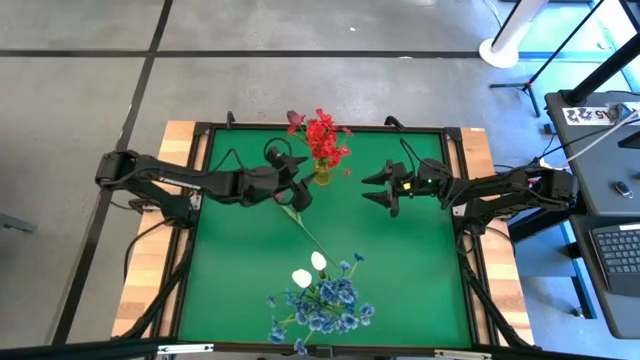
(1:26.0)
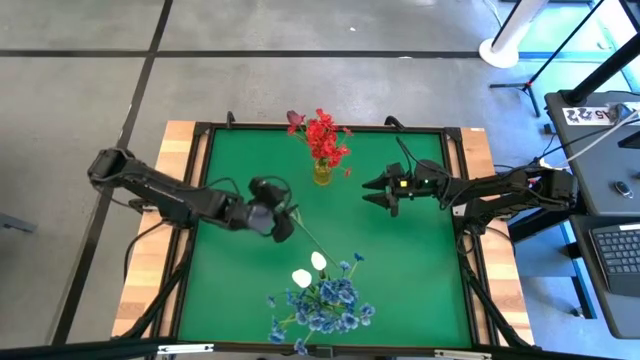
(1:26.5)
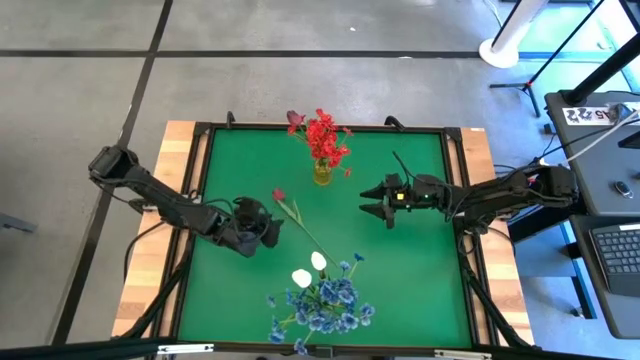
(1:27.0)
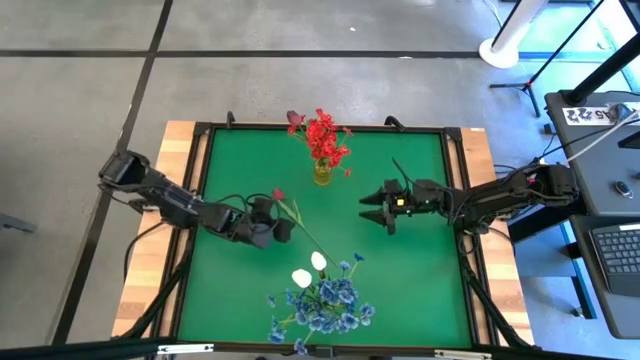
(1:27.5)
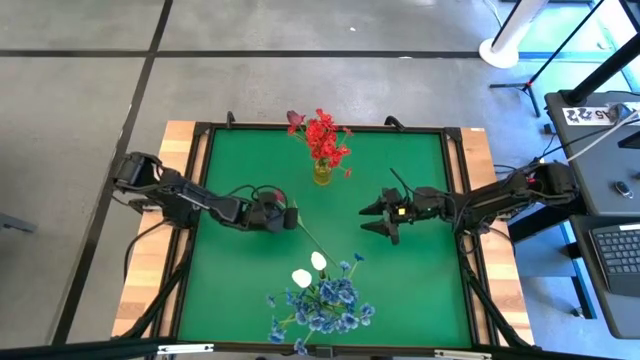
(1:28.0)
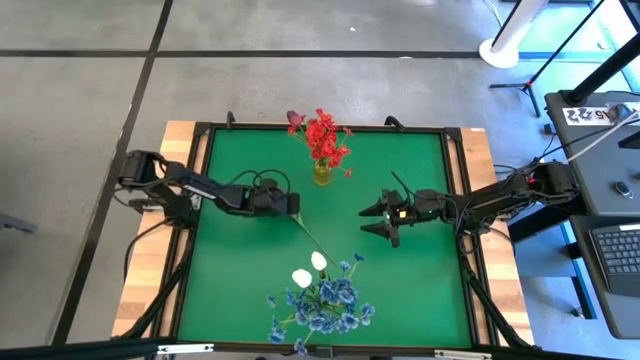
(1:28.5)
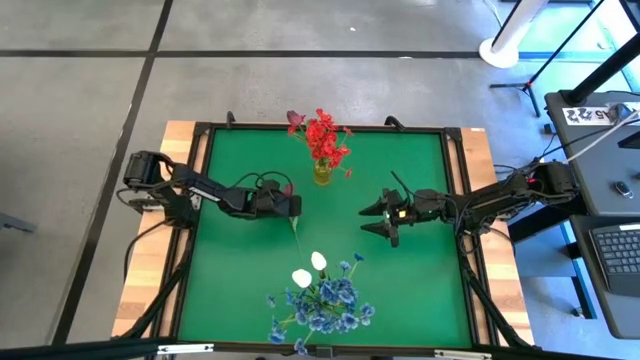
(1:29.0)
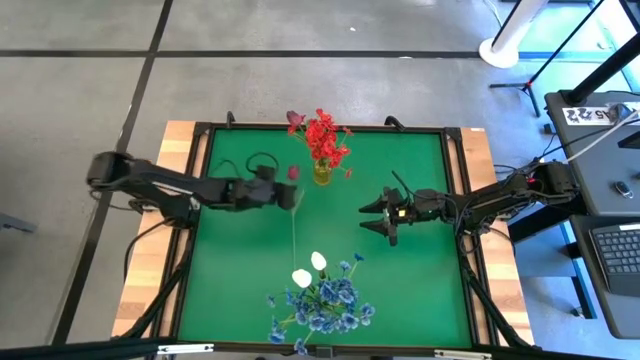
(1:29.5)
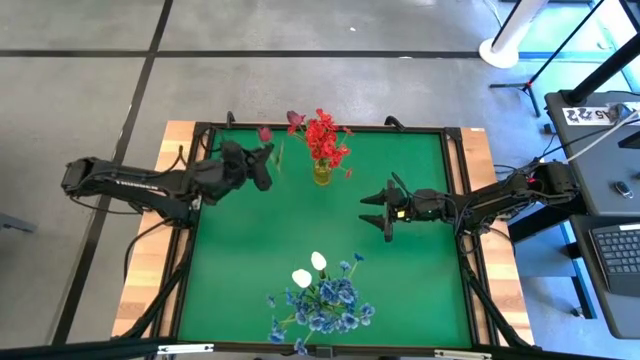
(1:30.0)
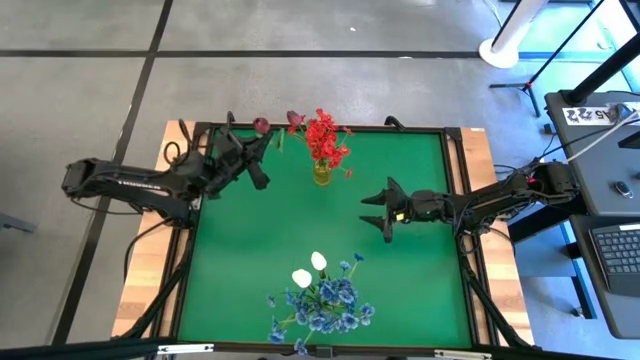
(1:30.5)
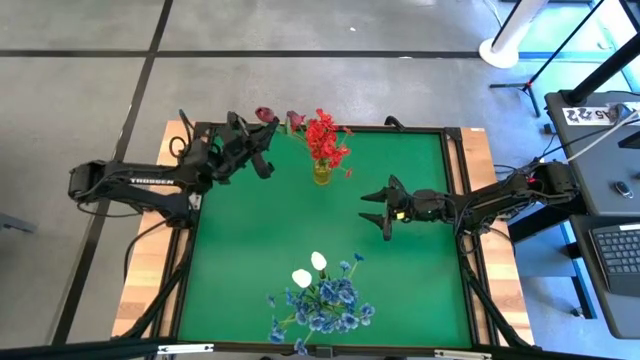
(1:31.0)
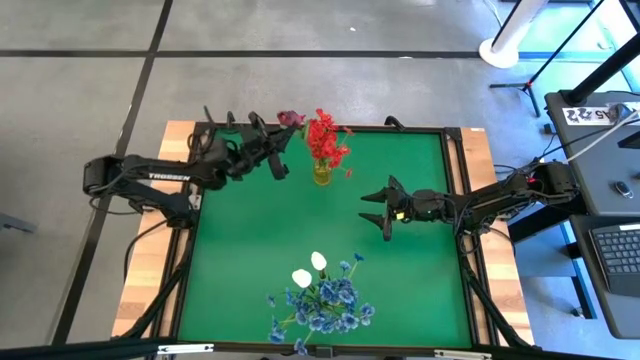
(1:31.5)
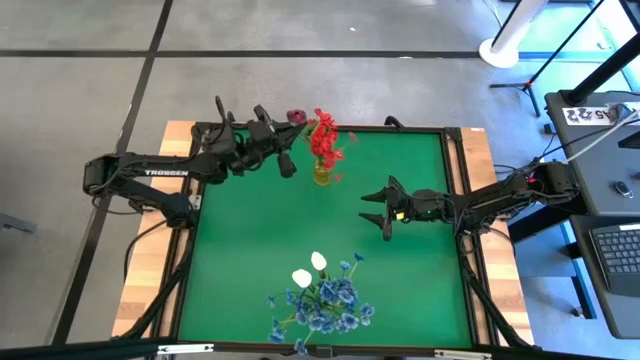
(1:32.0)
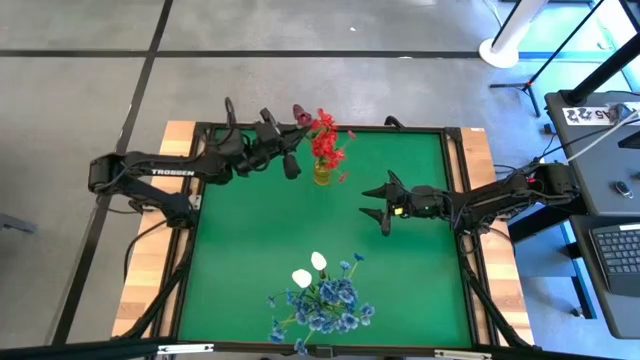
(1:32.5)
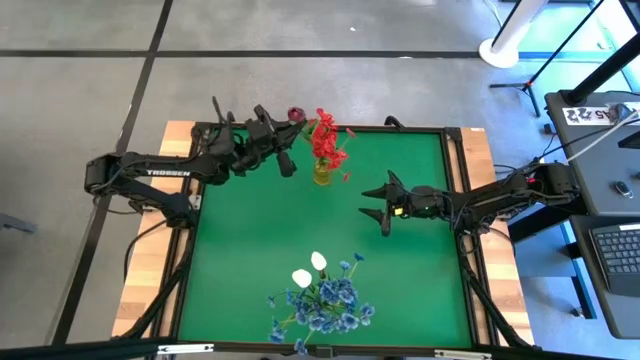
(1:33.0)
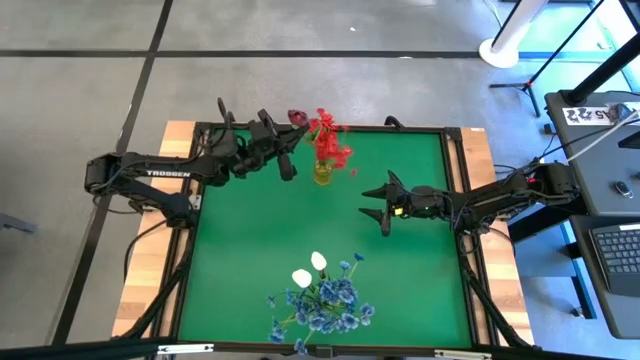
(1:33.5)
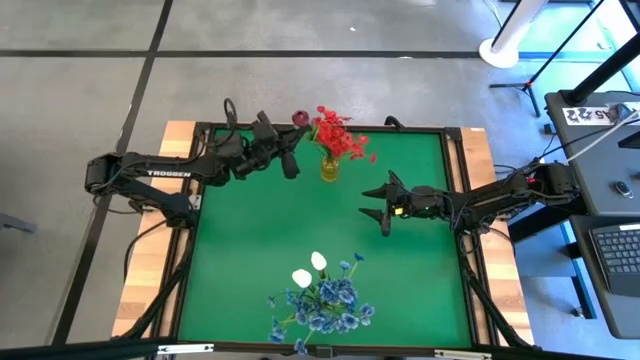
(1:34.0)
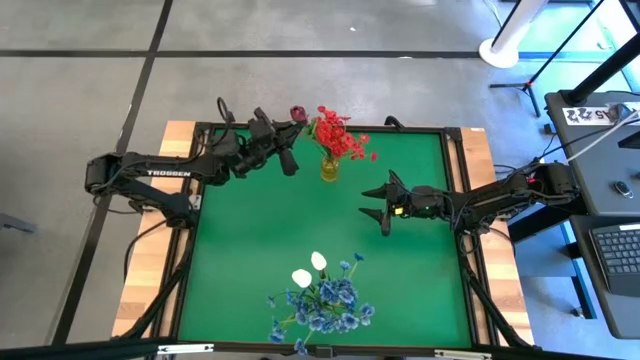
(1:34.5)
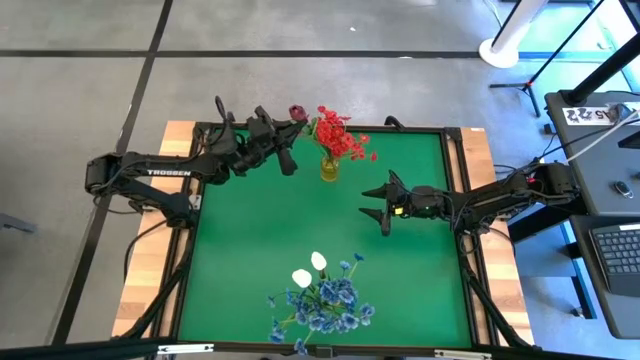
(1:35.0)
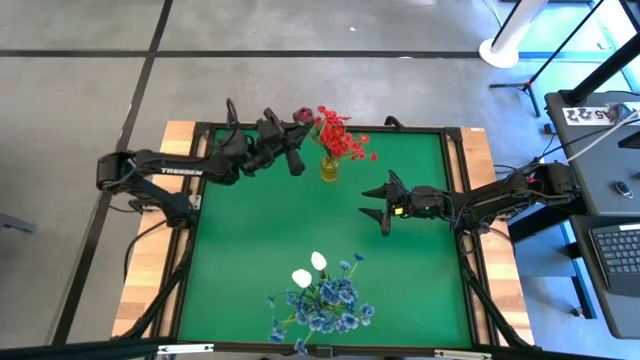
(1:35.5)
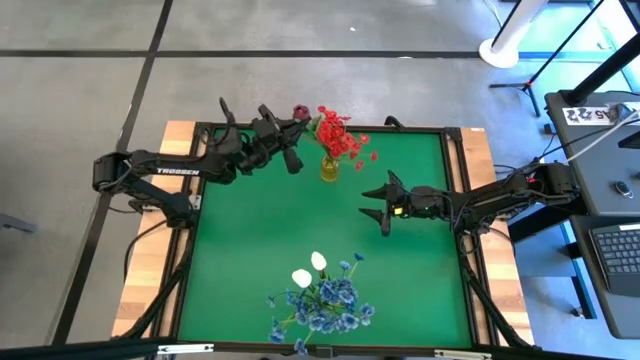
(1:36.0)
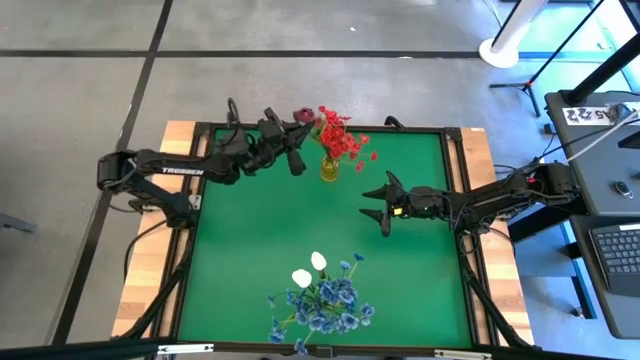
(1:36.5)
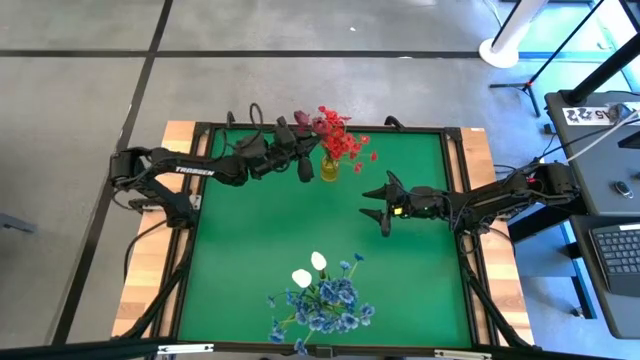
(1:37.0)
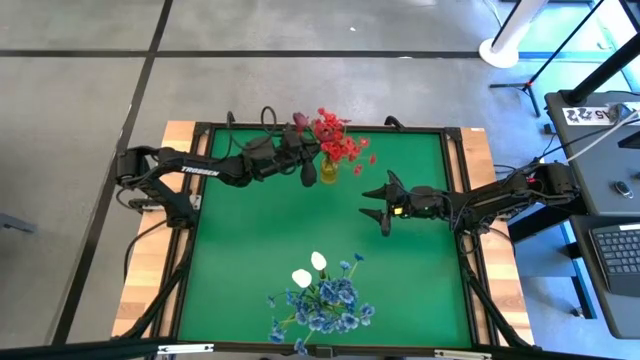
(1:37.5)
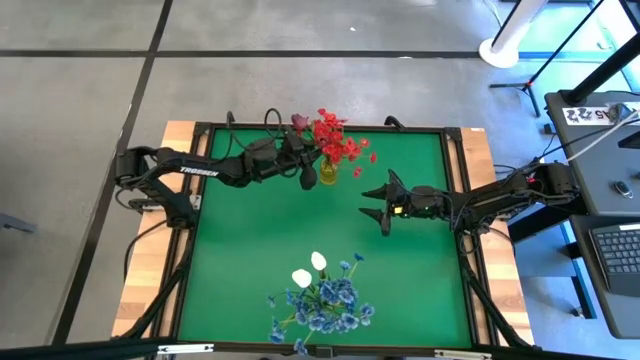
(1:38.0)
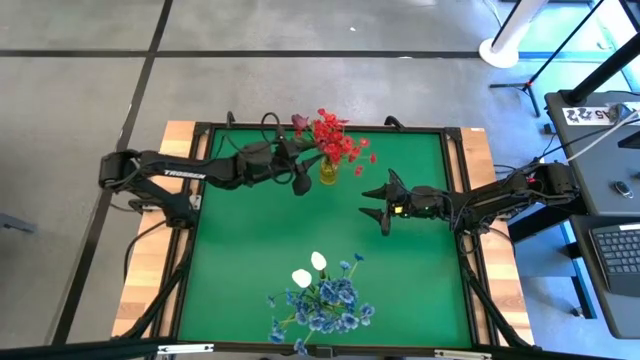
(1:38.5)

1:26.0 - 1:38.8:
Task: Sort flowers into vase by color
Put the dark red tulip into the yellow vase

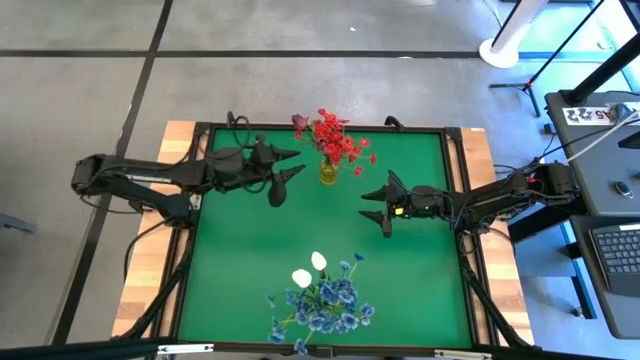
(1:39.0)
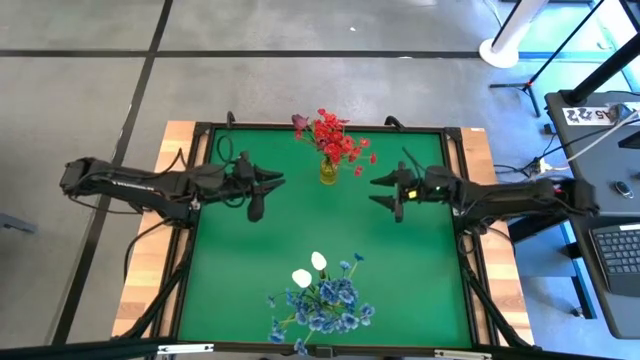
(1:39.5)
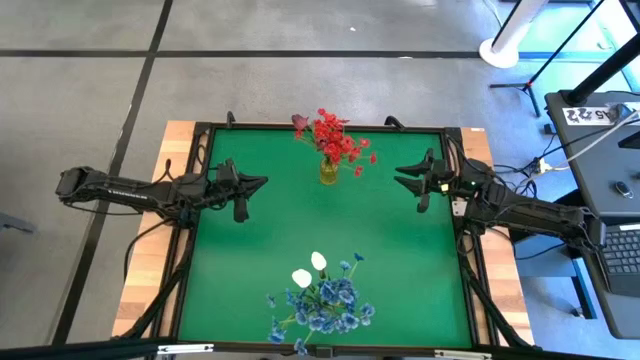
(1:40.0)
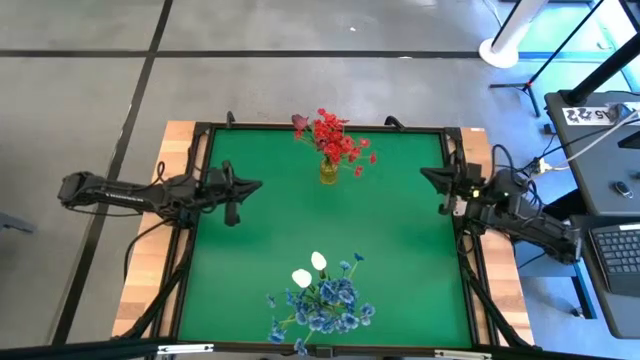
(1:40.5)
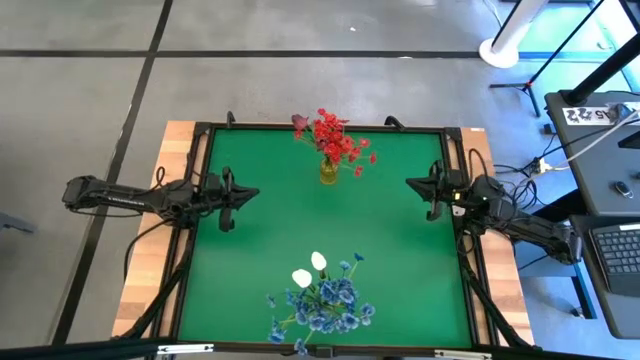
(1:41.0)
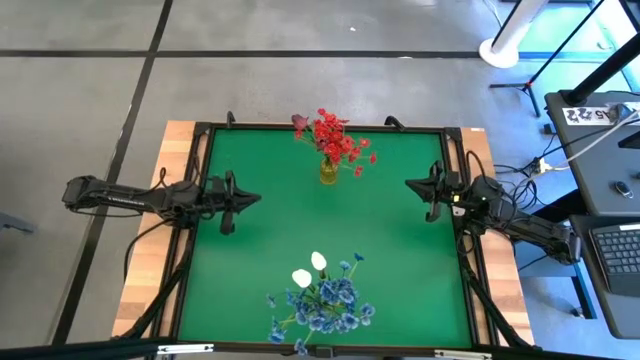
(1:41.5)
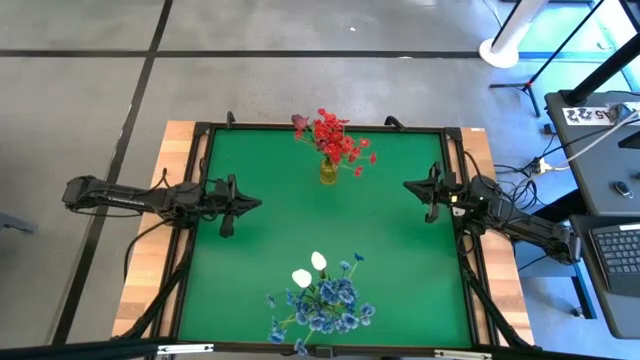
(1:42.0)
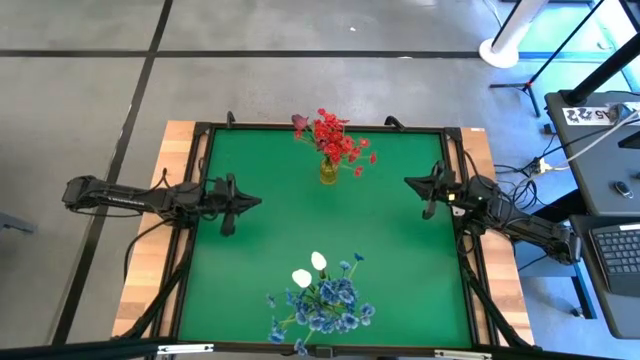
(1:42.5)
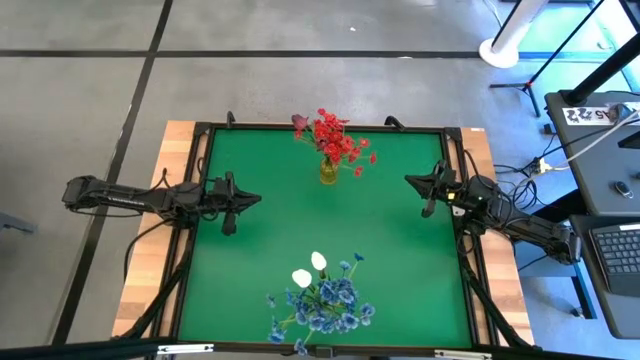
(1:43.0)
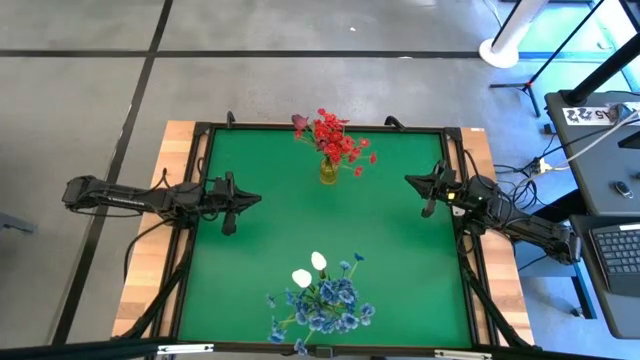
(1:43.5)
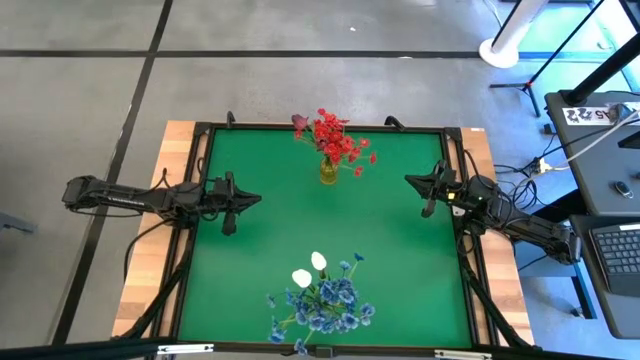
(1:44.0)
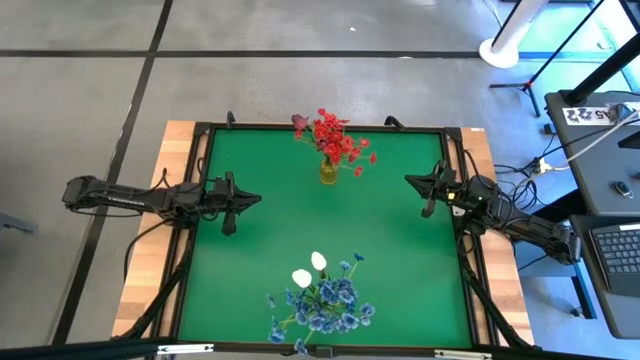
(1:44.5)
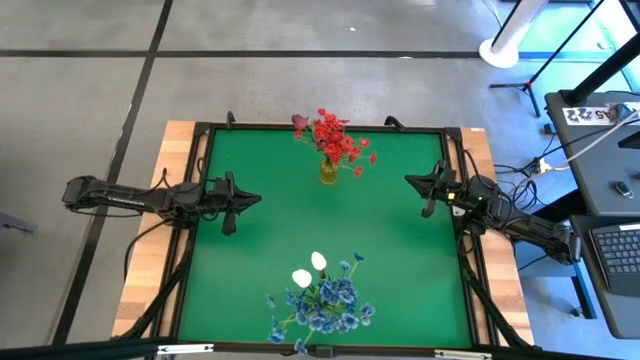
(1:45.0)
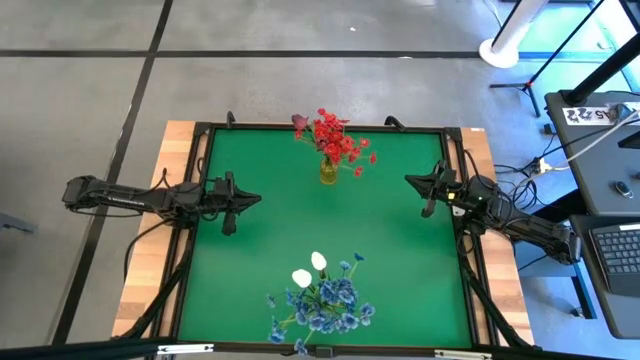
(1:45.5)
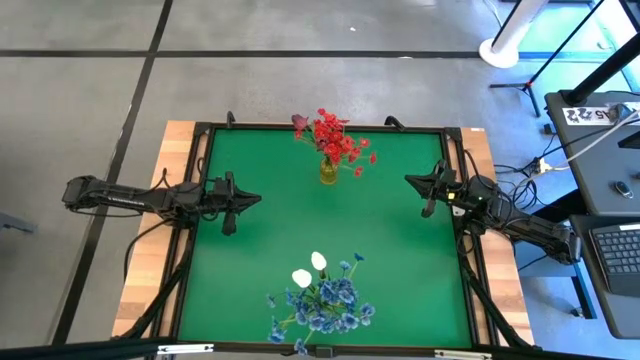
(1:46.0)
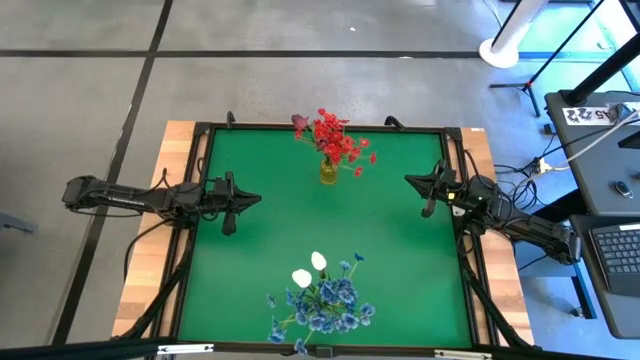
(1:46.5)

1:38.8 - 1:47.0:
Return to Home Position

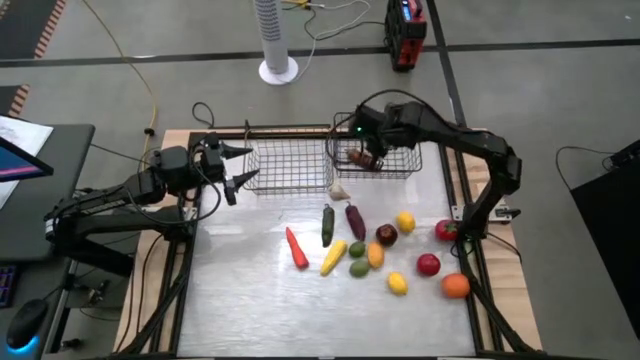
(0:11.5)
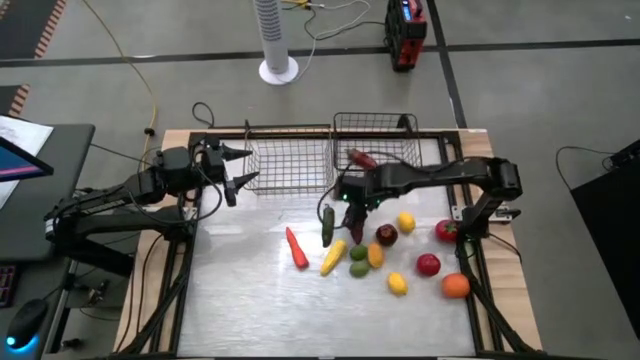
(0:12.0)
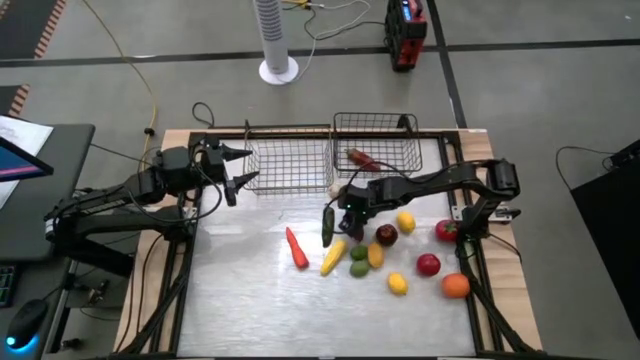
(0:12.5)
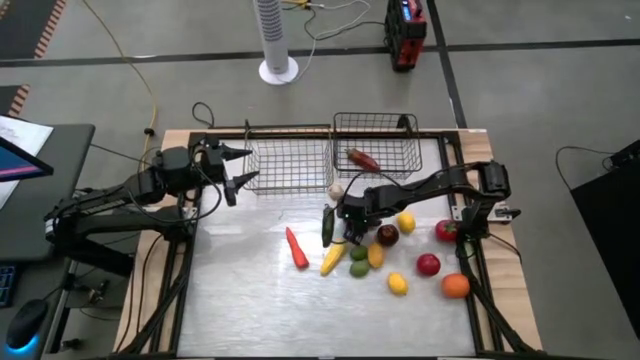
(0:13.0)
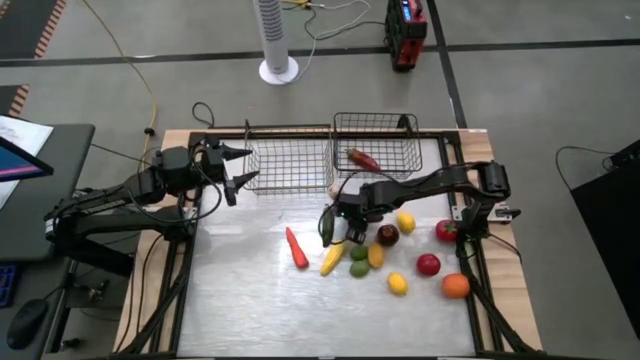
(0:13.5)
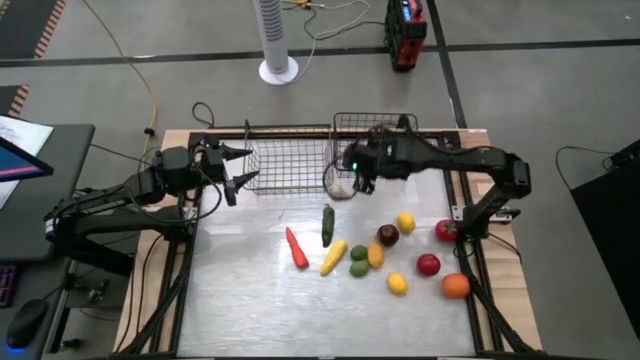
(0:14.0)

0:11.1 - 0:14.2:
Task: Sort produce into baskets
Put the dark red chili pepper into the right wire basket
